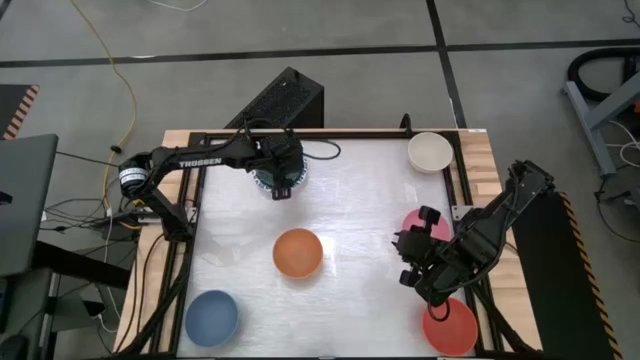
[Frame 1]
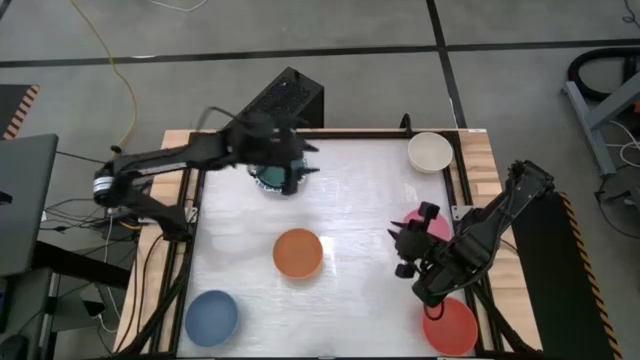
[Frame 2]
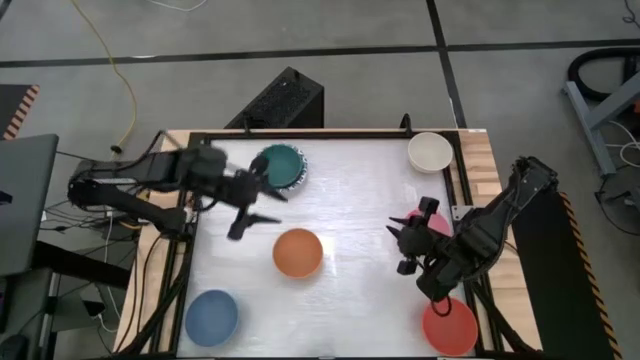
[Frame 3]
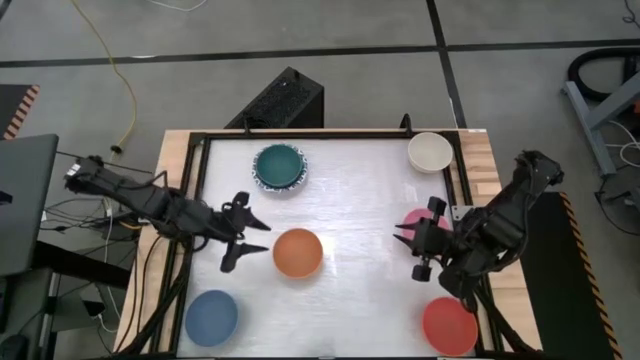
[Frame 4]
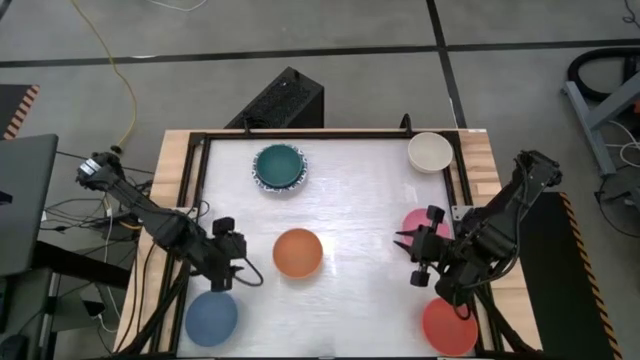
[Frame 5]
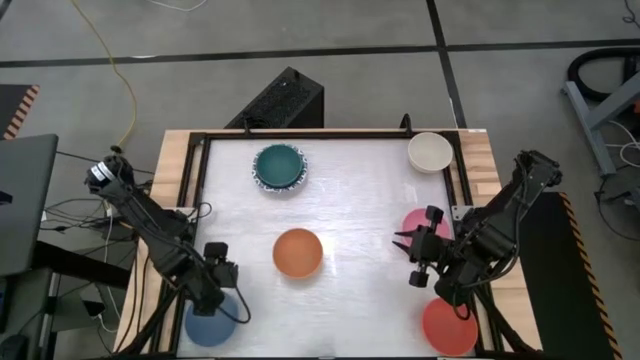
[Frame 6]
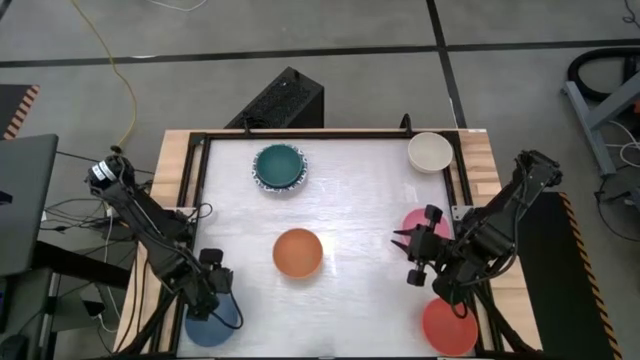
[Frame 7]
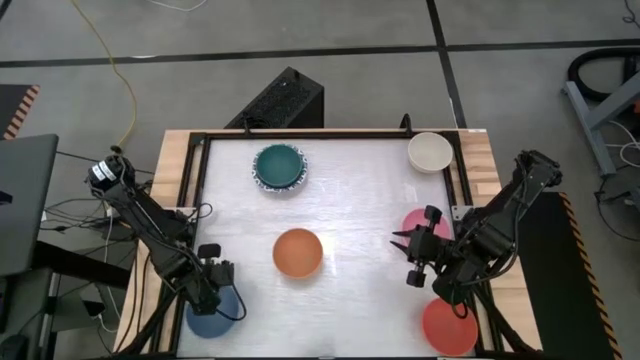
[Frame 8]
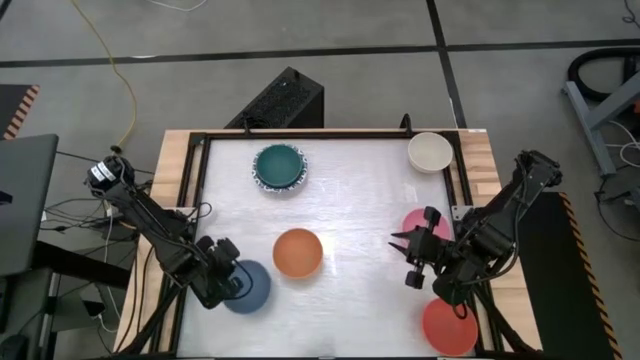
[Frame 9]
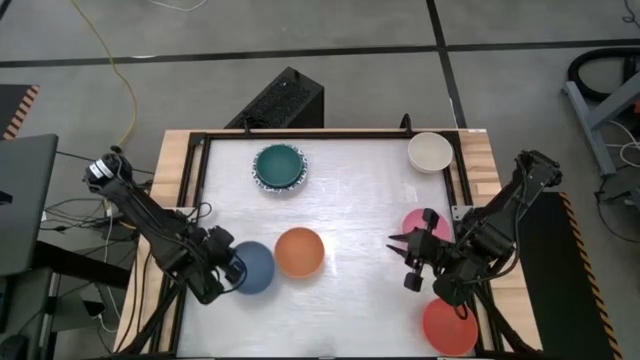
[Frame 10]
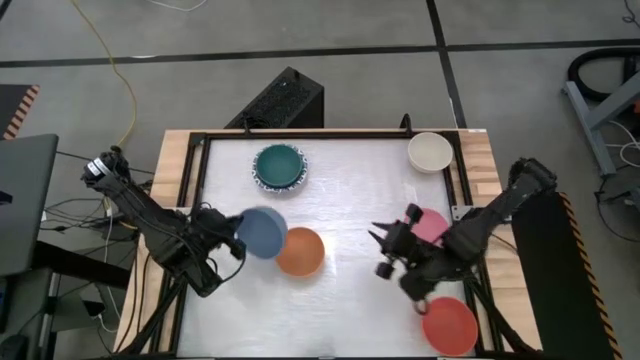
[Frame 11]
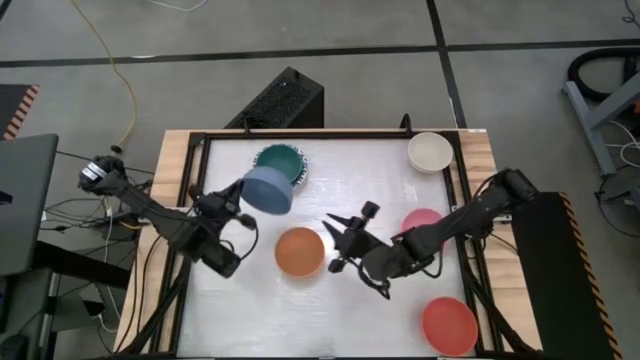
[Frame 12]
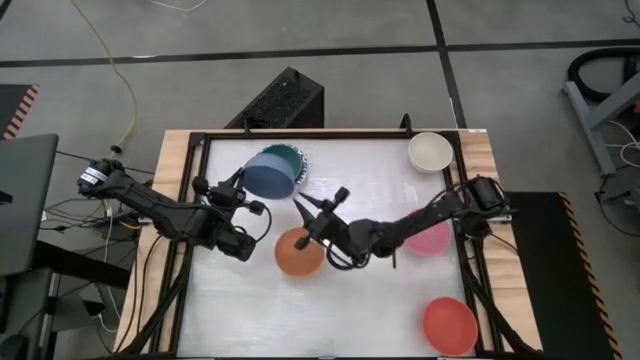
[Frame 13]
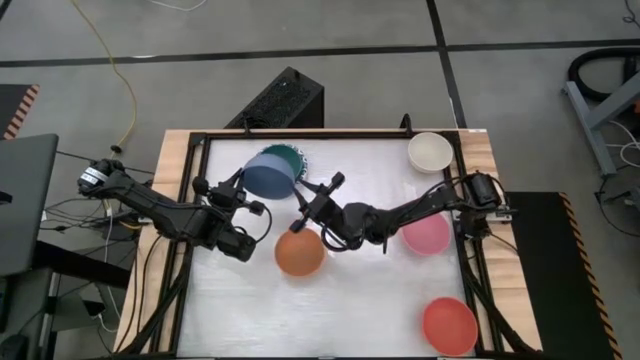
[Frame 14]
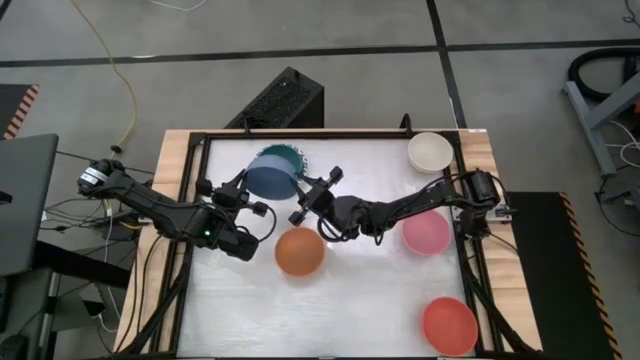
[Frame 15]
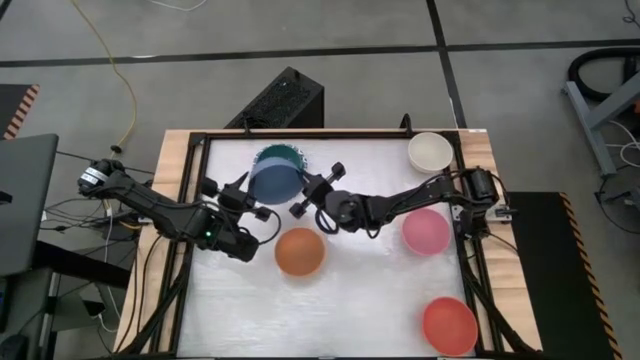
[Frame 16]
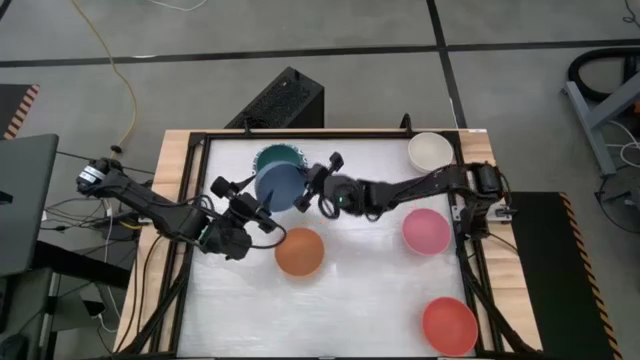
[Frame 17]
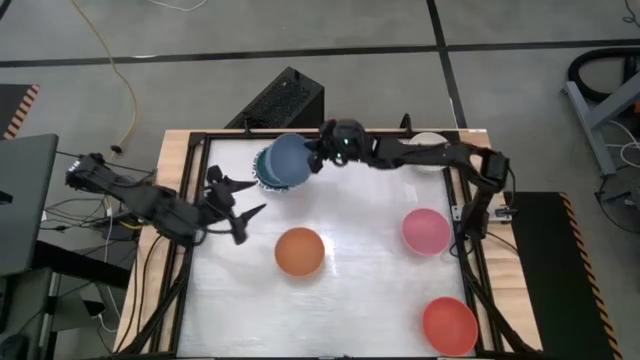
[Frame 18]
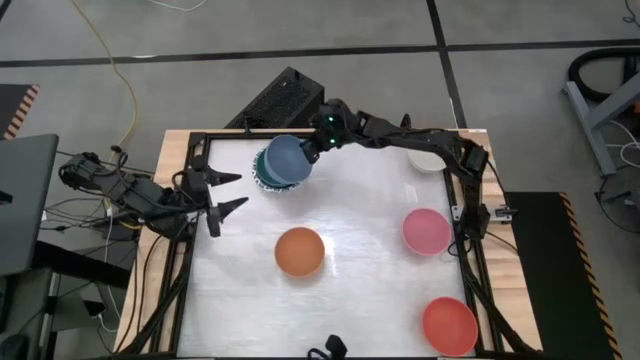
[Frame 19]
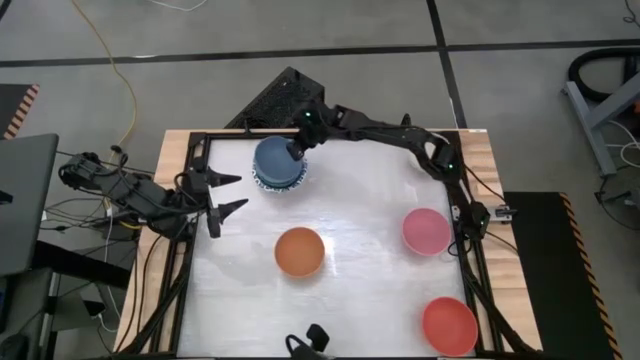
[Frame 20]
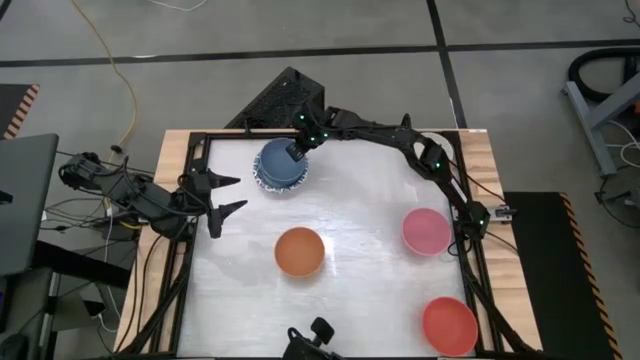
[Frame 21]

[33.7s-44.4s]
Stack the dark blue bowl on the green bowl

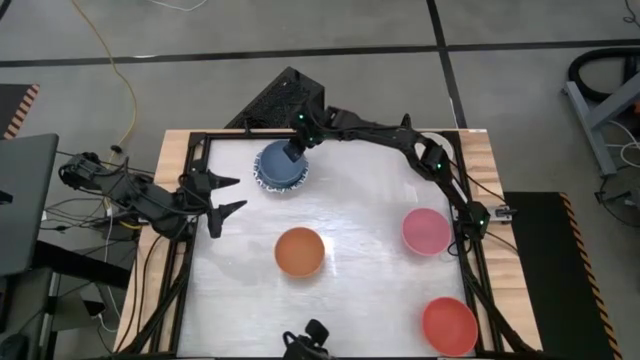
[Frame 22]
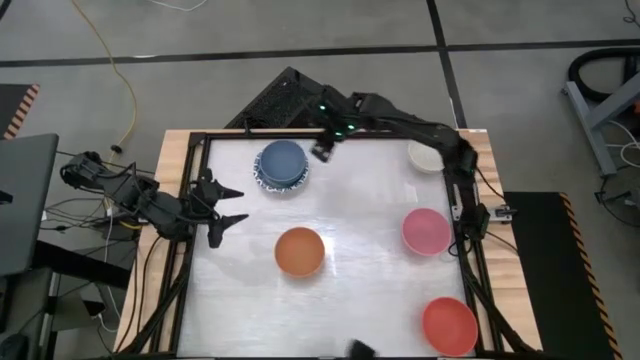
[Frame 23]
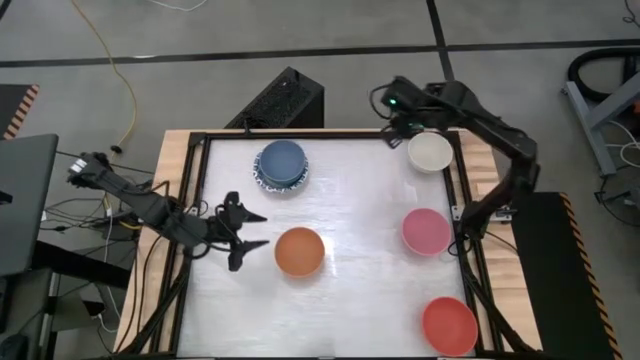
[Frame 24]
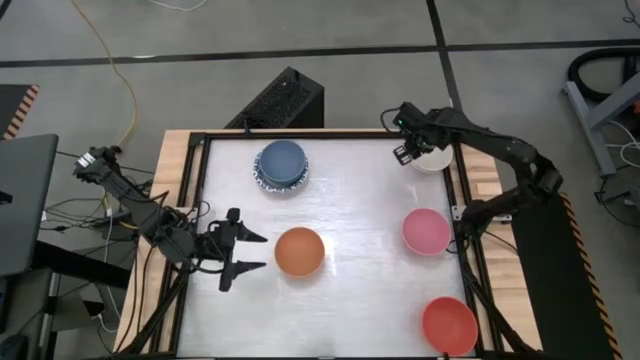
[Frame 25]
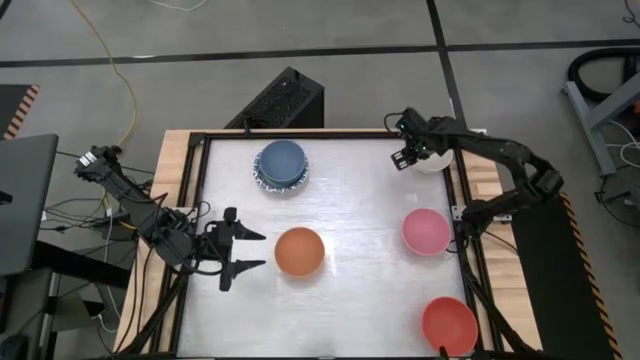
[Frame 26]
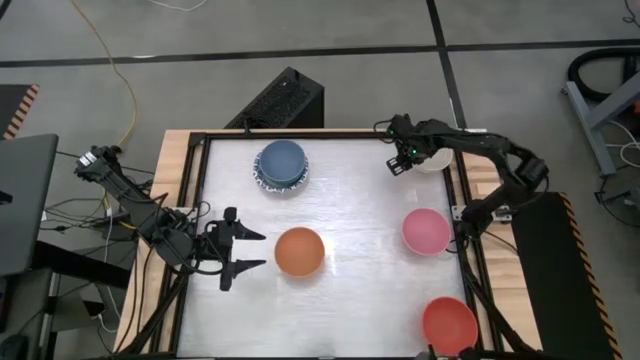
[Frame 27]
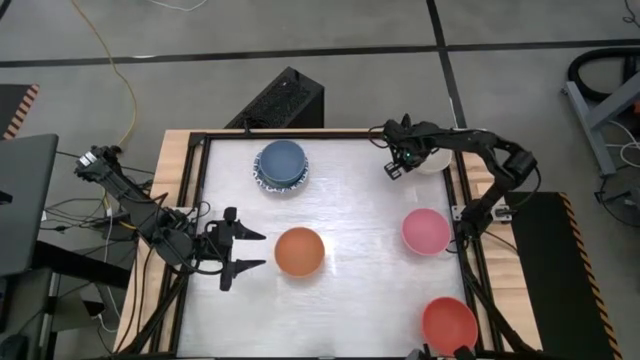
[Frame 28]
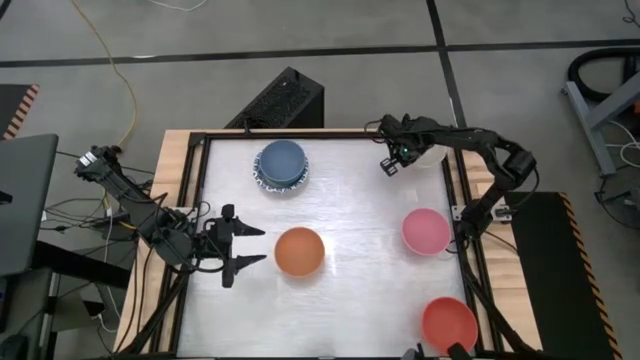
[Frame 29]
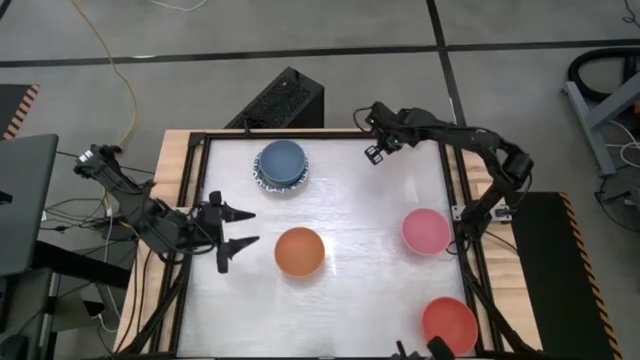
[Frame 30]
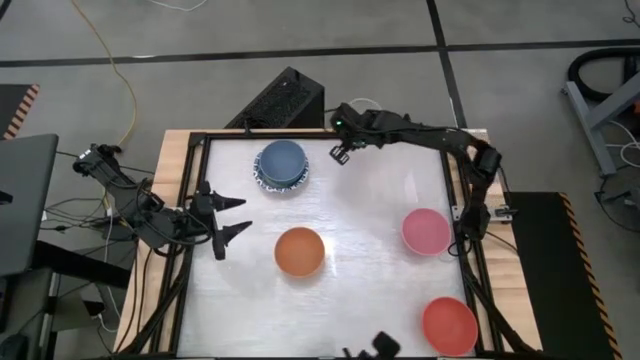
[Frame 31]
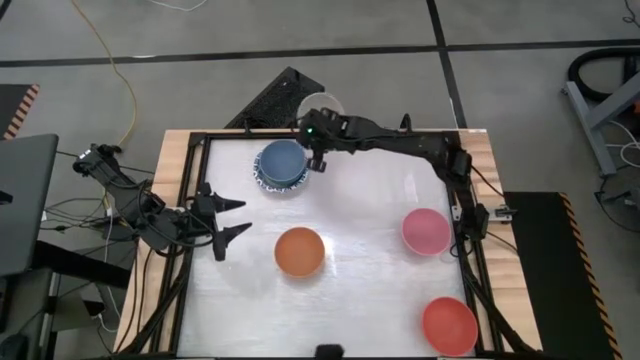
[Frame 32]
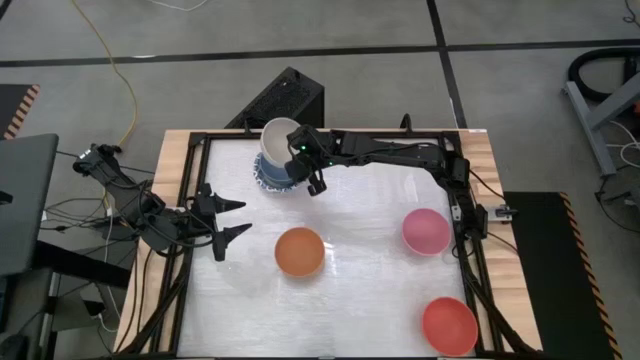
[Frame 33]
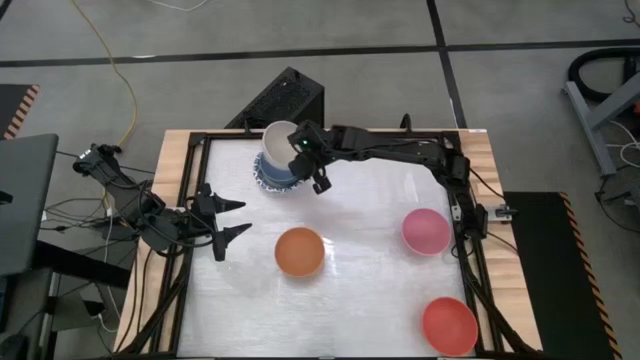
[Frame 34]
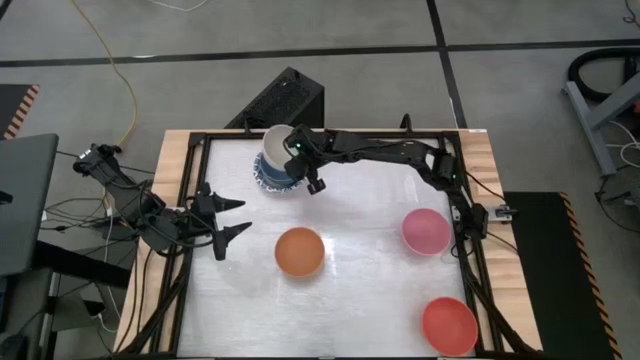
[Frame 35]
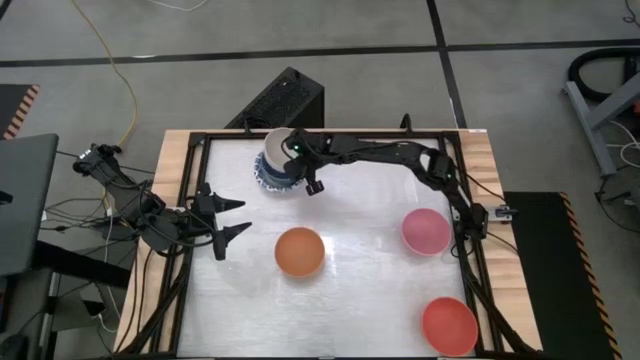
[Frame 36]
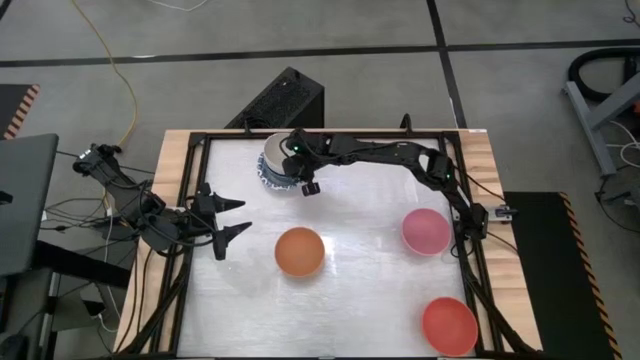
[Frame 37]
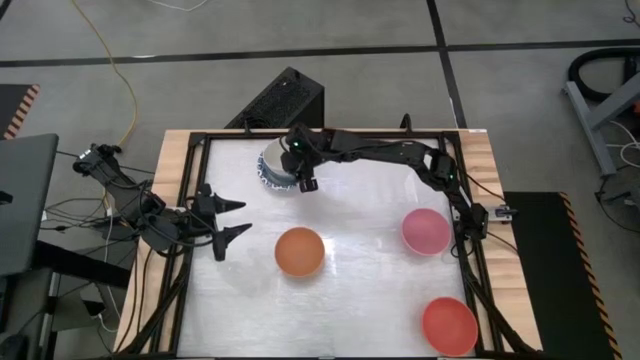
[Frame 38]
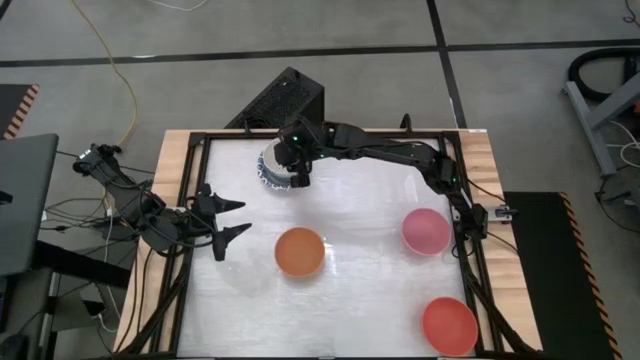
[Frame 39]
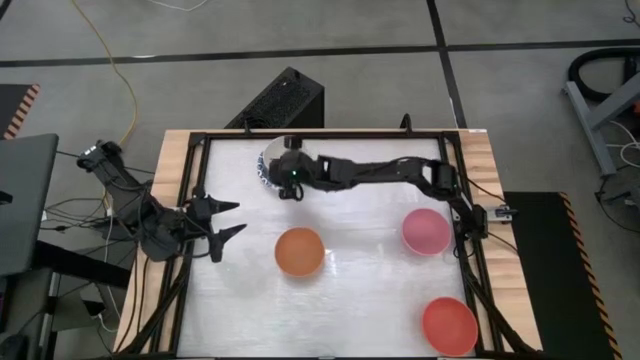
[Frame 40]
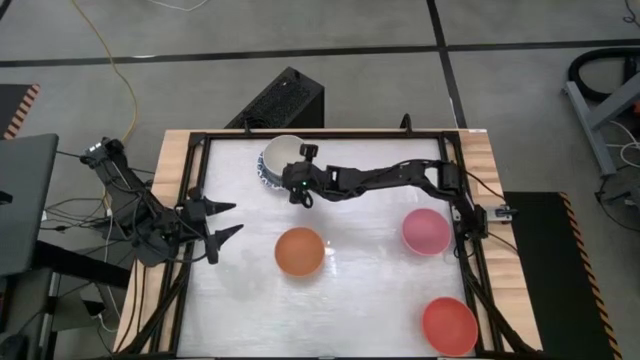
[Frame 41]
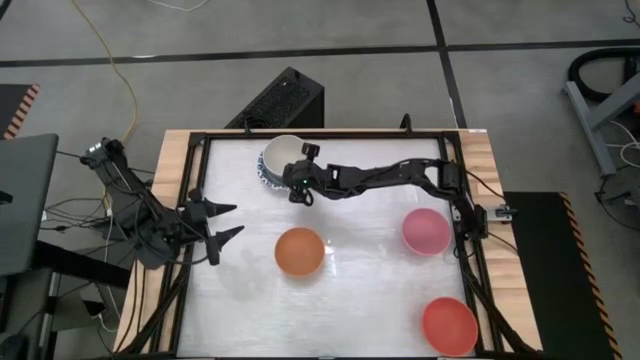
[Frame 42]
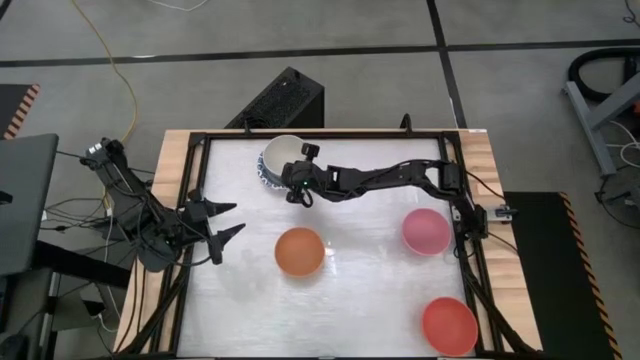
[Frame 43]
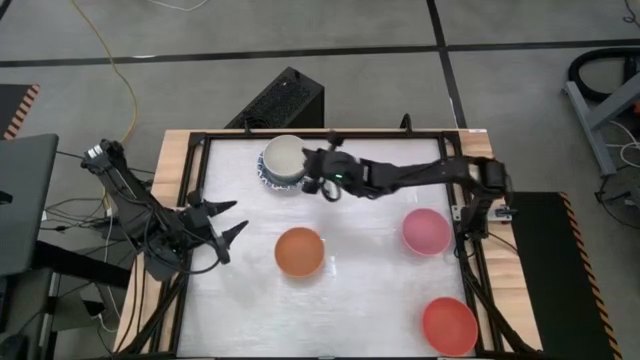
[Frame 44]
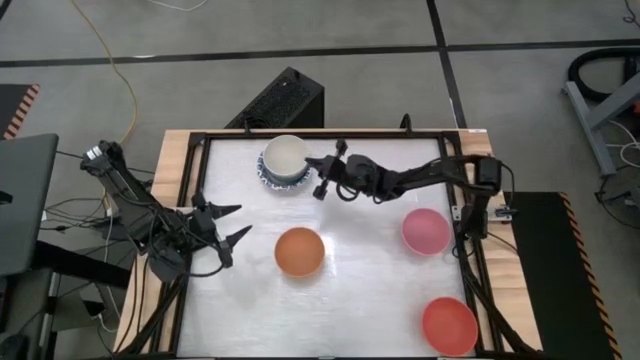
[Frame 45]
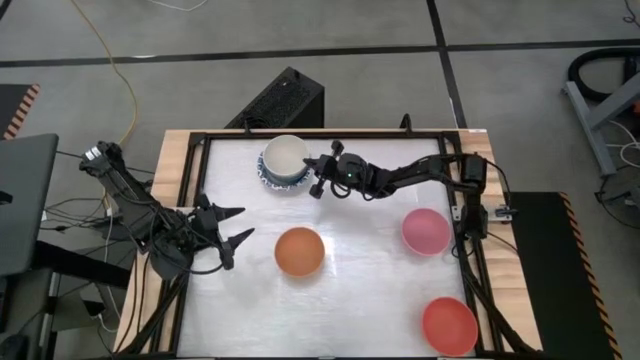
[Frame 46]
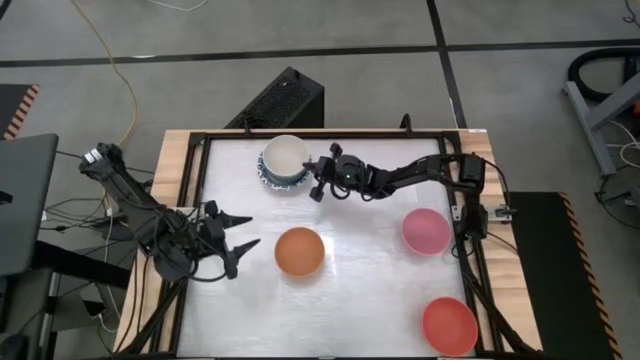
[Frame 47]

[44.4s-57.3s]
Stack the white bowl on the dark blue bowl
